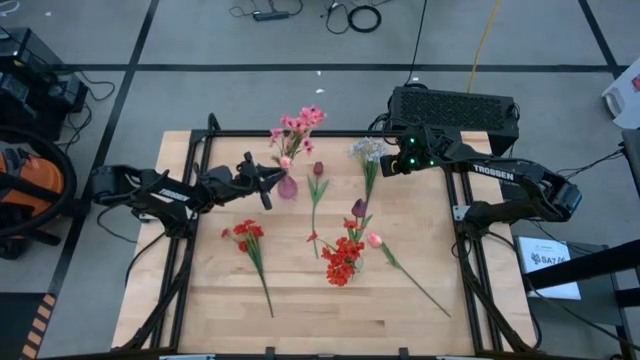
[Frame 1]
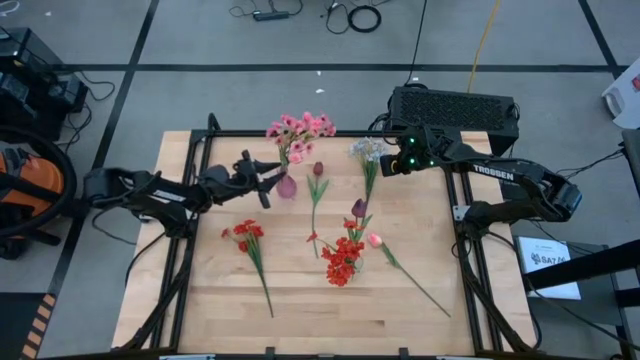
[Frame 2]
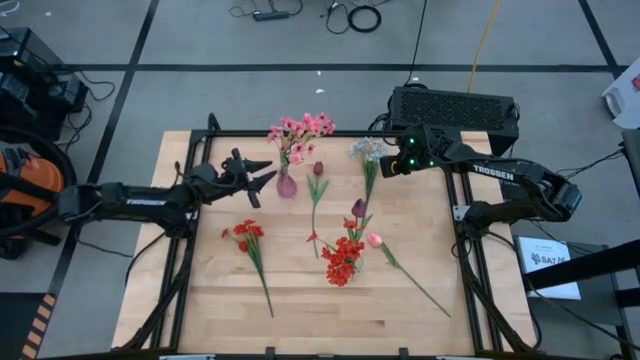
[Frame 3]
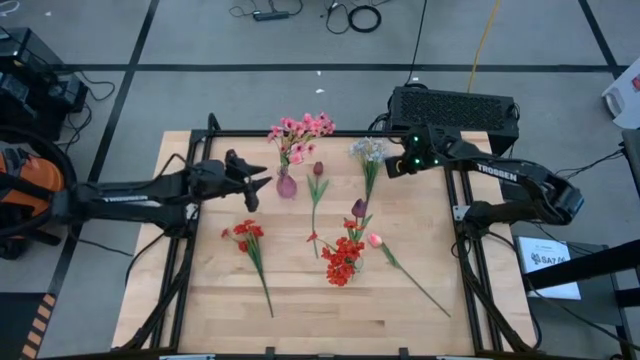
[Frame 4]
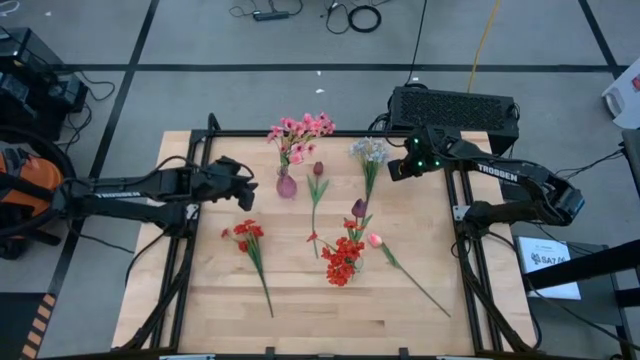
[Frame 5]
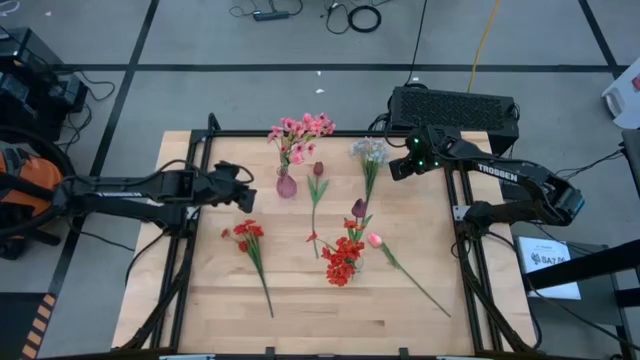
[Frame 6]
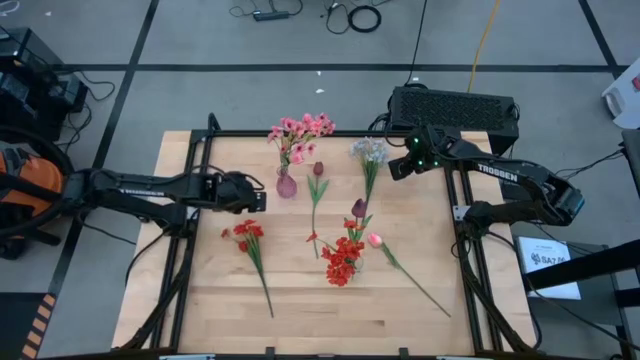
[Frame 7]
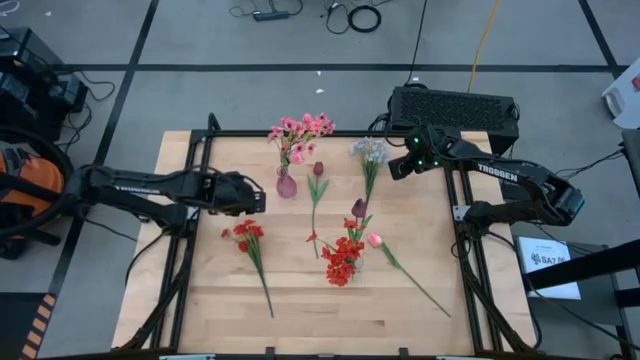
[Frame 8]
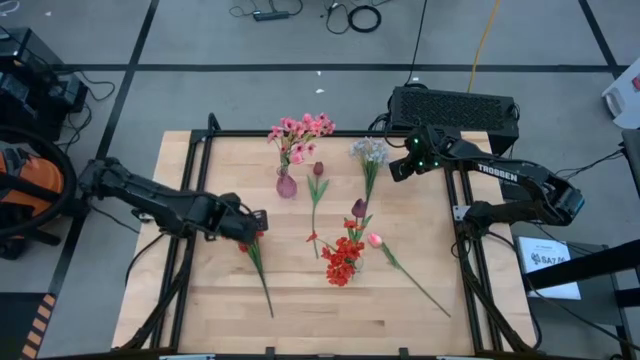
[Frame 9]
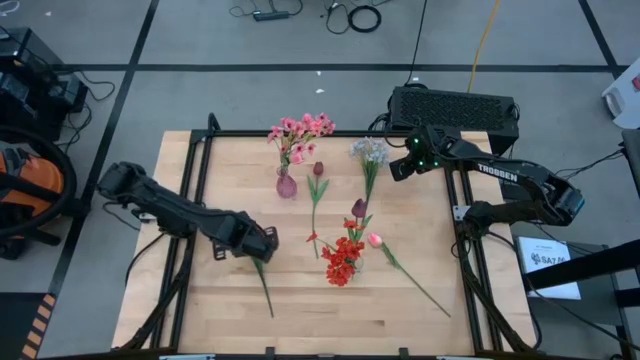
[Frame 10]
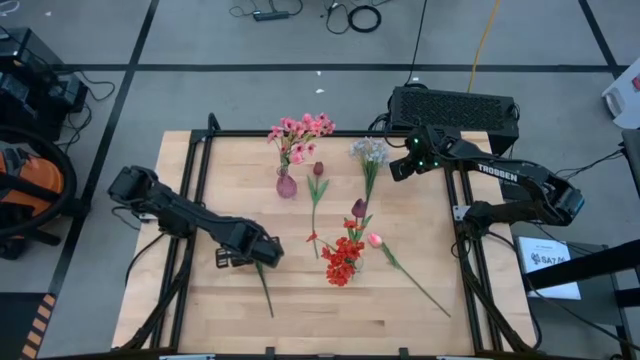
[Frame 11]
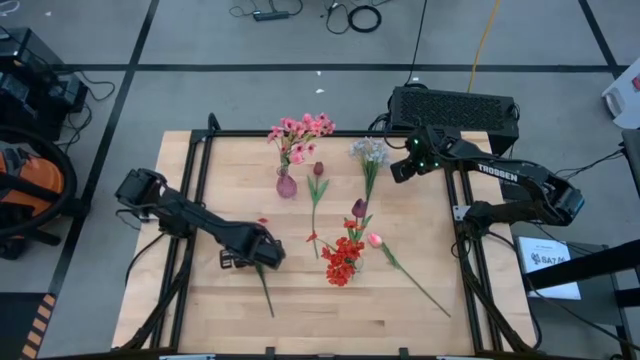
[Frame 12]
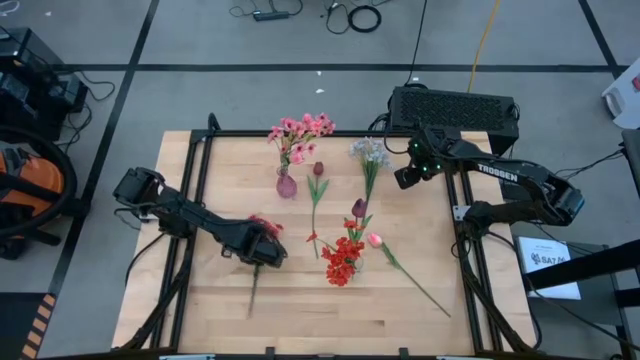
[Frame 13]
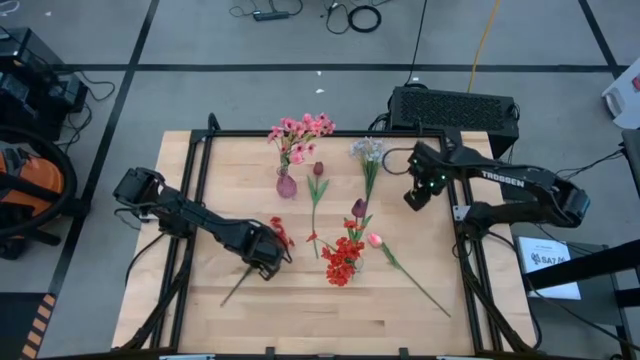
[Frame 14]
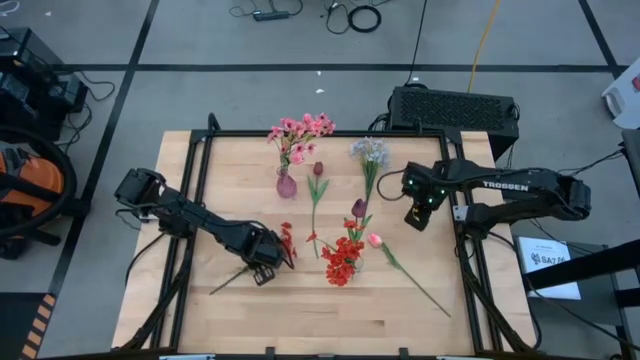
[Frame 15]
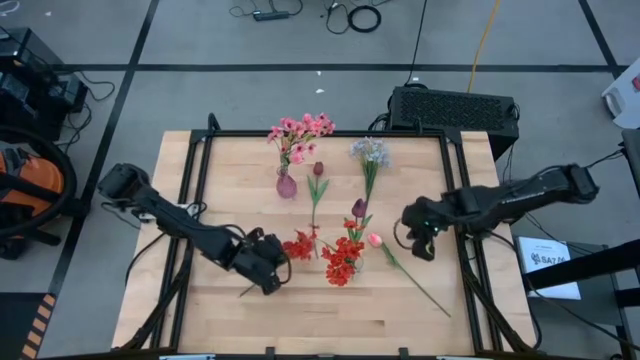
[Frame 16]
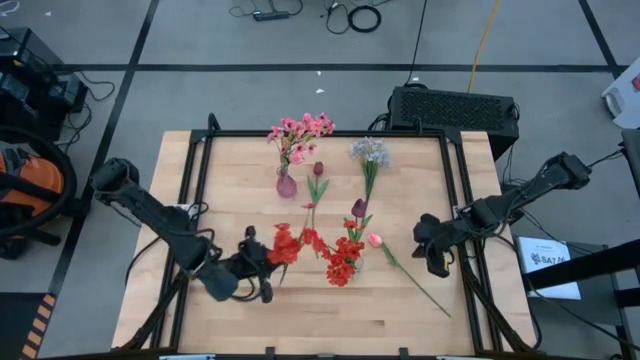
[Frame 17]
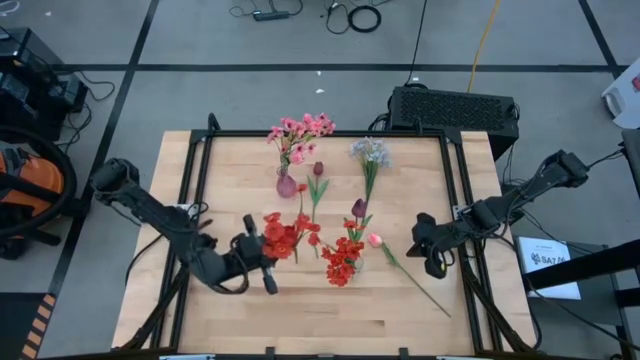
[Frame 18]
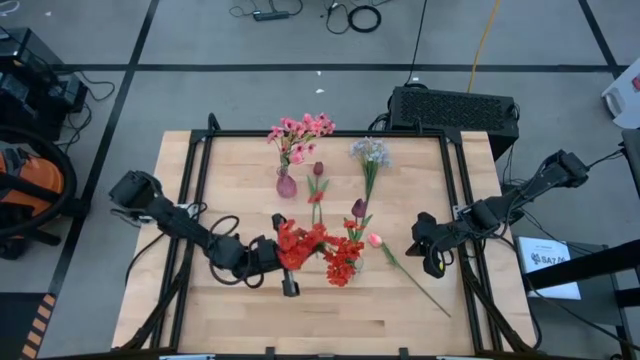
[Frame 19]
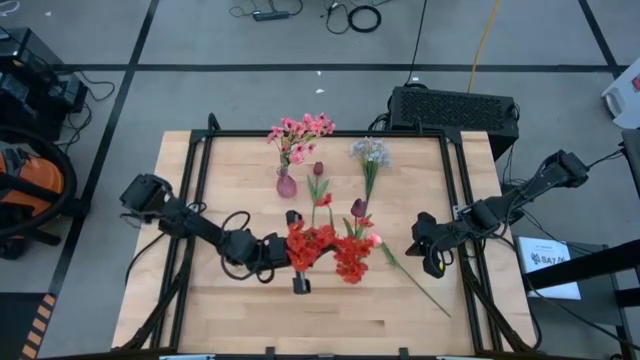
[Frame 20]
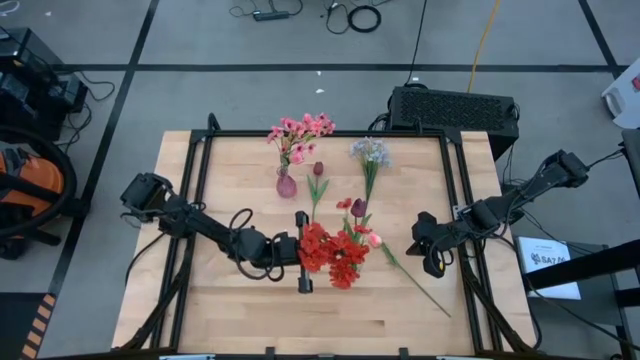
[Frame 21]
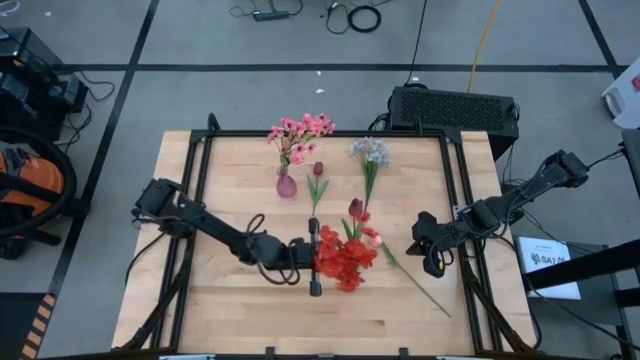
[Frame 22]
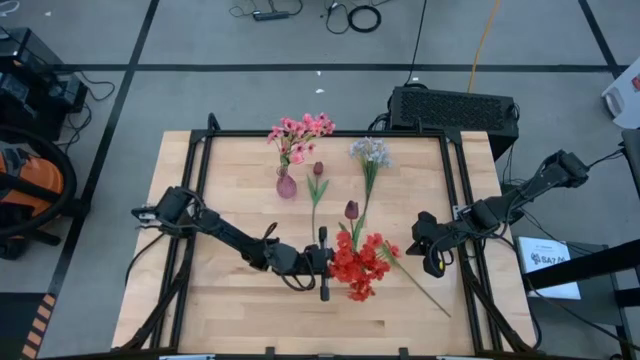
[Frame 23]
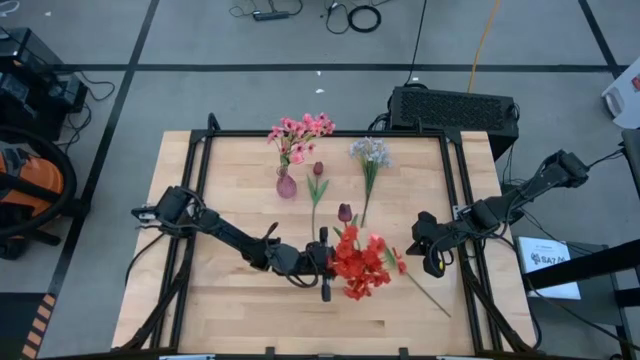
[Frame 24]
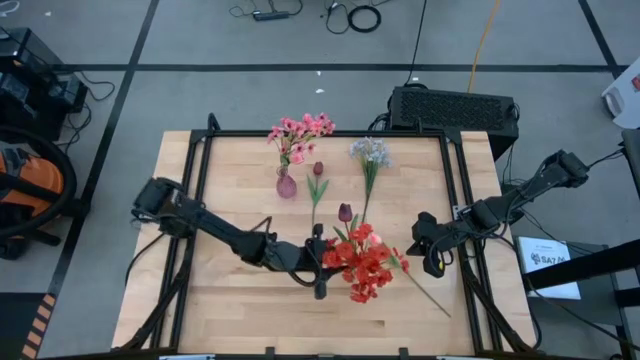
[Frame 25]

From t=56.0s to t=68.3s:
Task: Sort flowers into vase by color
Put the red flowers into the transparent flower vase

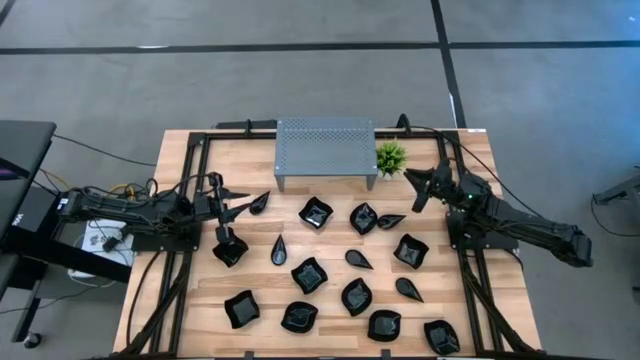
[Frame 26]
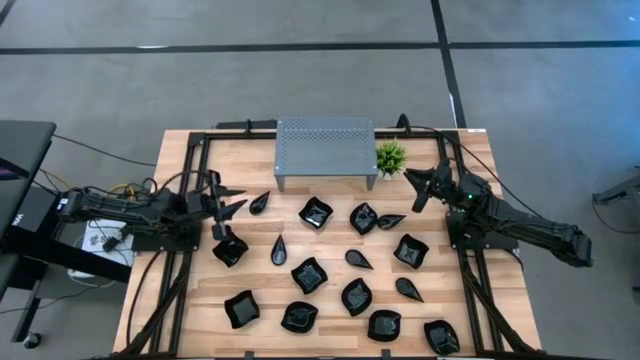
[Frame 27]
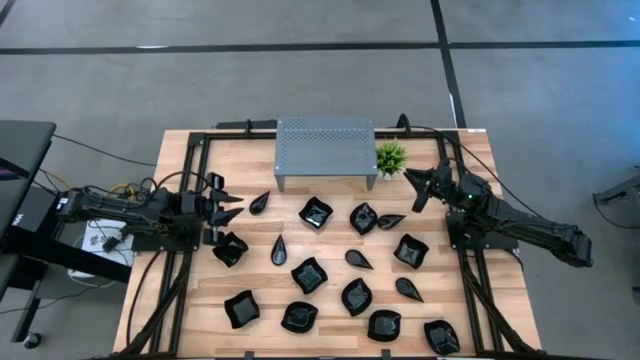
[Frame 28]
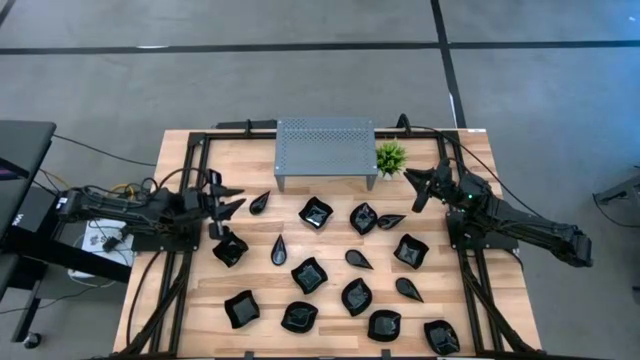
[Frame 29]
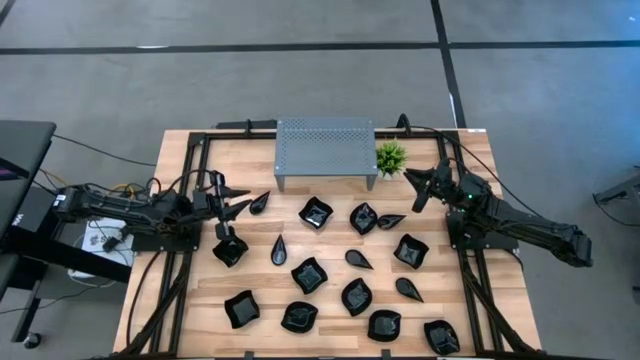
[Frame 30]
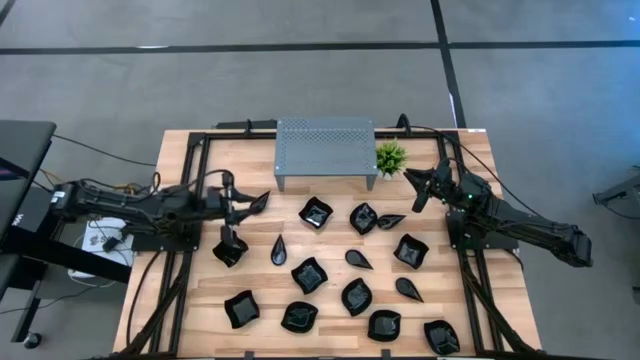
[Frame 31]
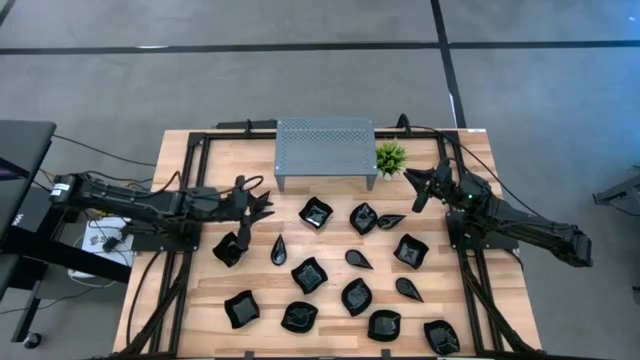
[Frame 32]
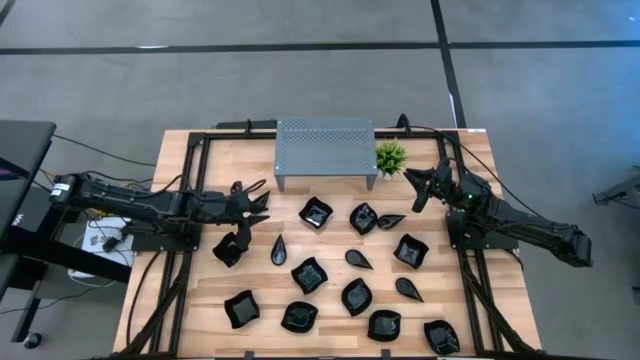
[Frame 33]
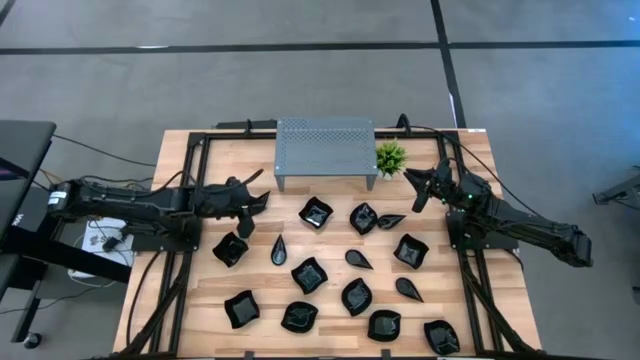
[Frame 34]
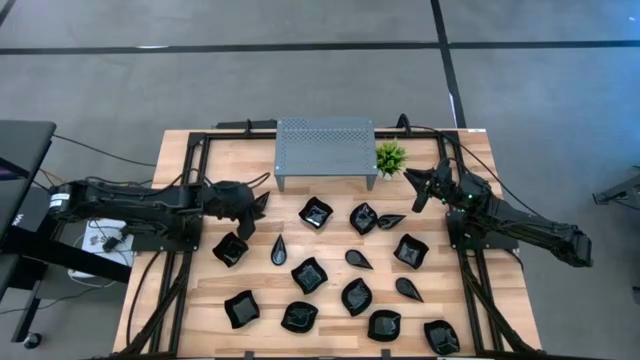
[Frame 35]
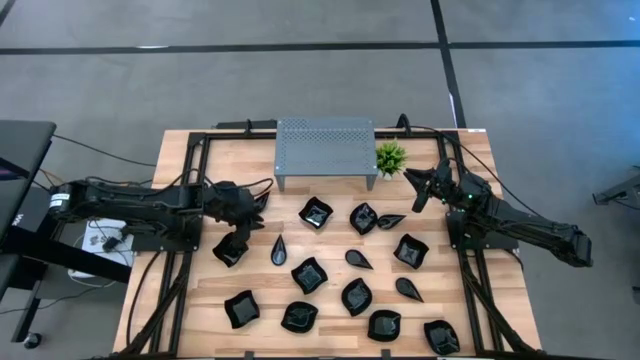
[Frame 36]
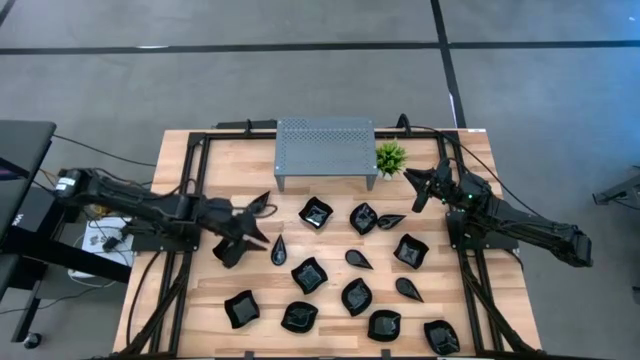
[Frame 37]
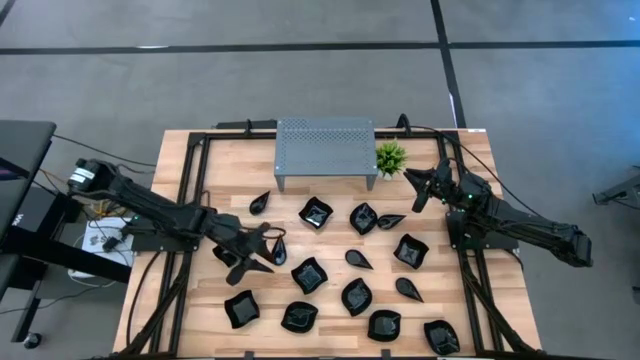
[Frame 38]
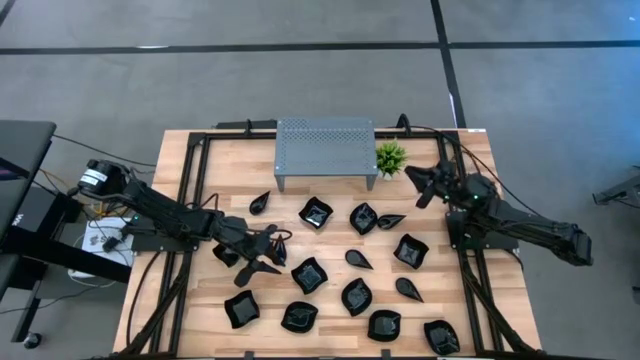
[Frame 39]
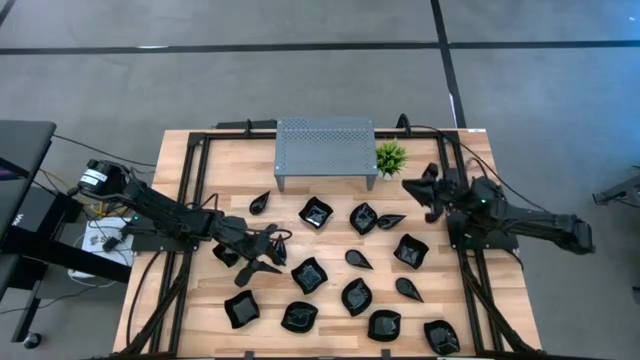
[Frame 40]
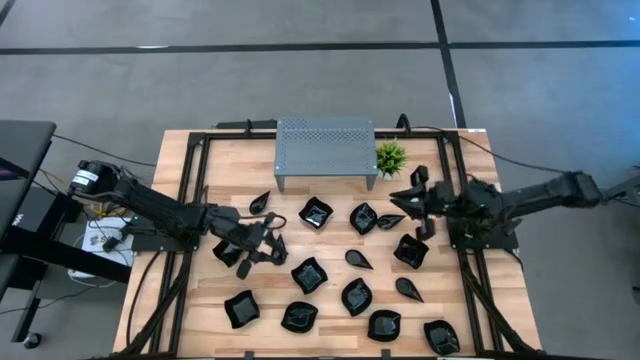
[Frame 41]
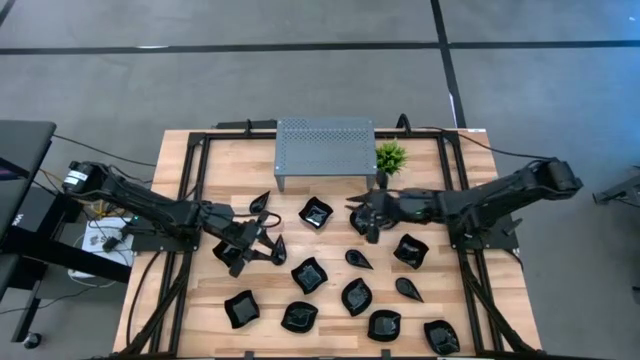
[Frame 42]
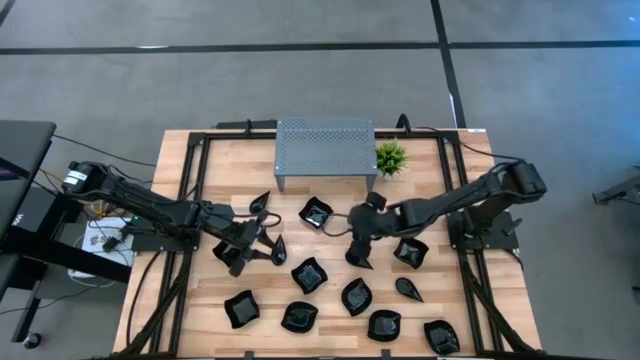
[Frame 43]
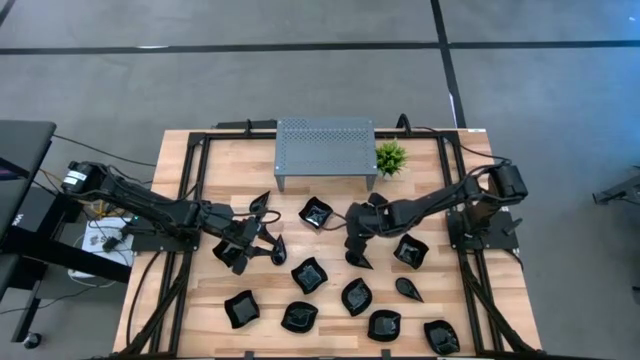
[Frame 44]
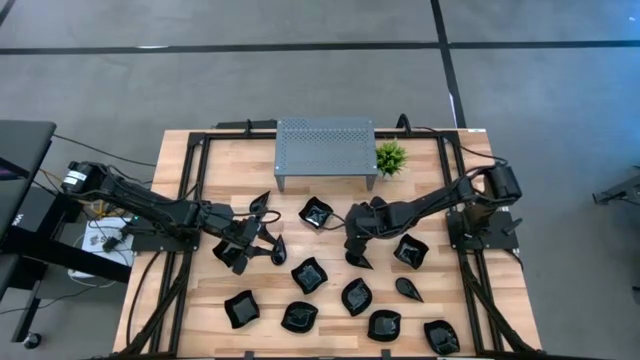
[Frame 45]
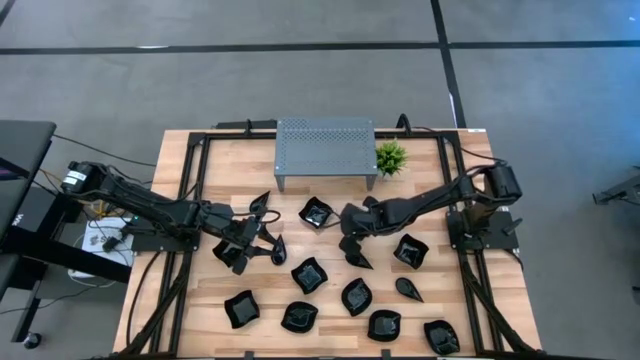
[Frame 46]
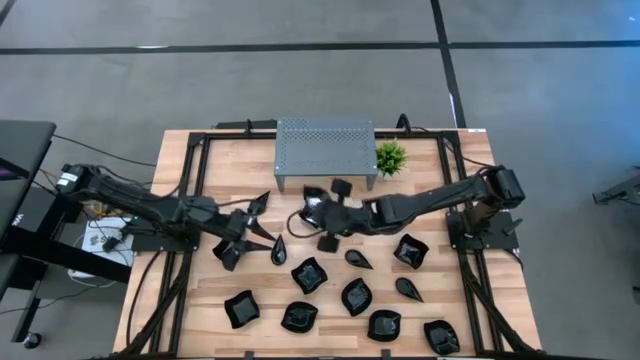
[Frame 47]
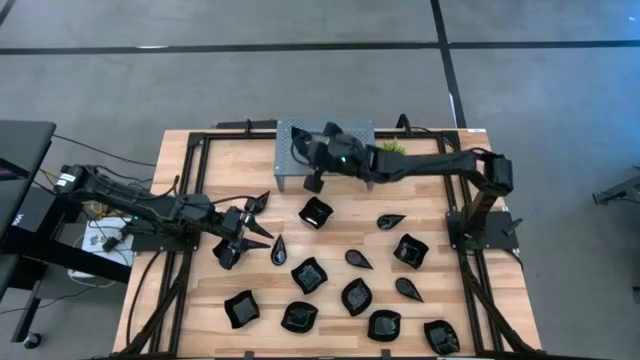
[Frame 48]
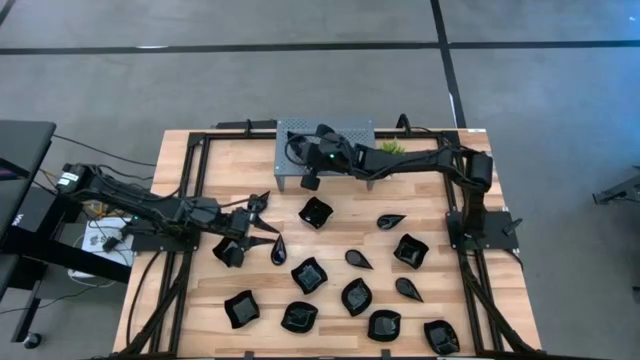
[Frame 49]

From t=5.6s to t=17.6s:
Task: Pick & Place Mini shaped plates
Put the leaf-shaped plate on the shelf
